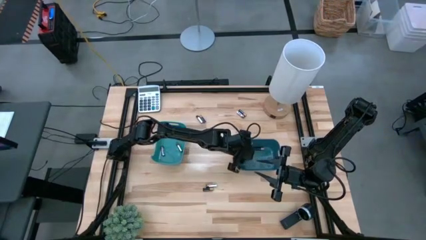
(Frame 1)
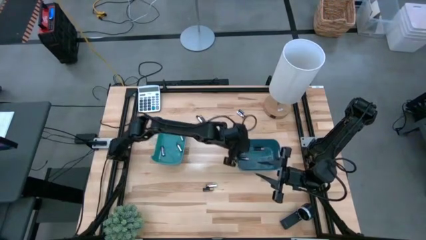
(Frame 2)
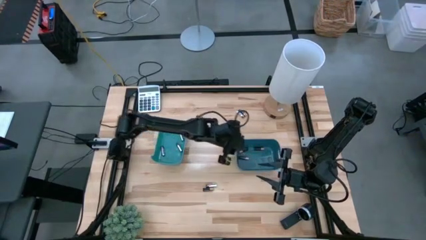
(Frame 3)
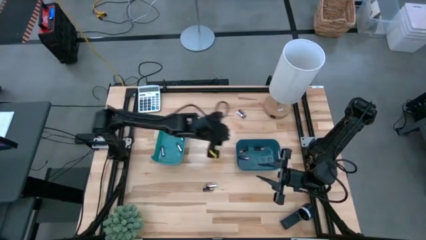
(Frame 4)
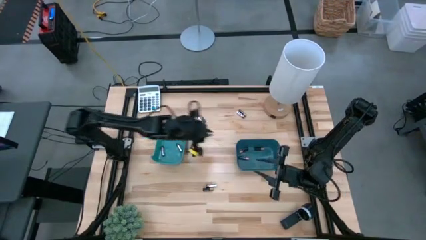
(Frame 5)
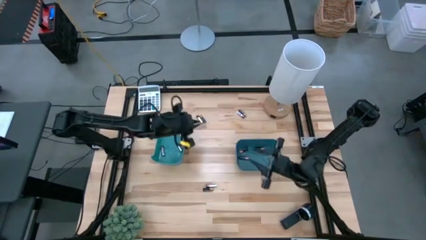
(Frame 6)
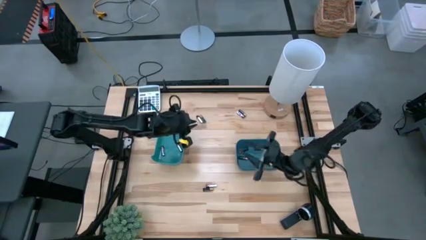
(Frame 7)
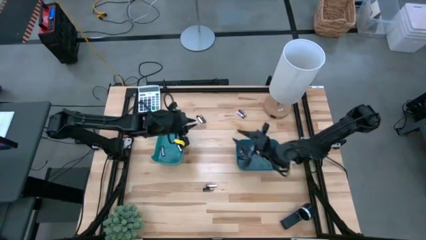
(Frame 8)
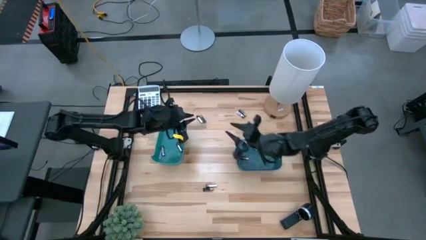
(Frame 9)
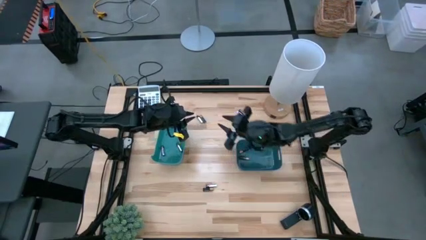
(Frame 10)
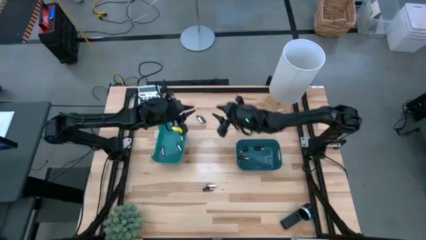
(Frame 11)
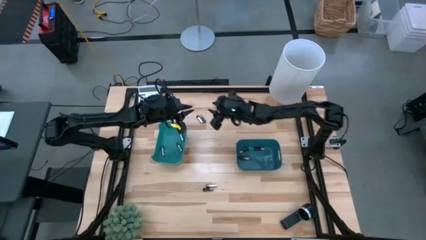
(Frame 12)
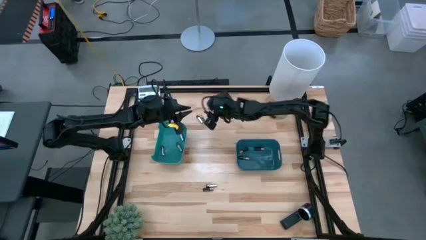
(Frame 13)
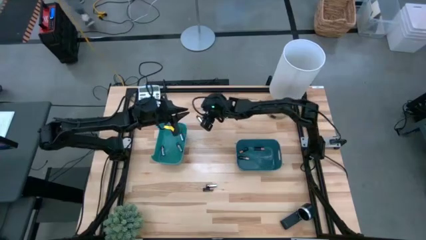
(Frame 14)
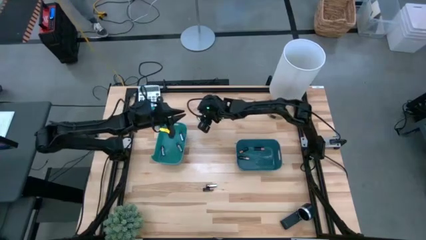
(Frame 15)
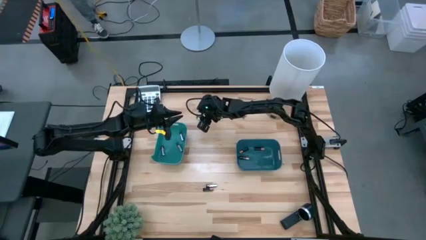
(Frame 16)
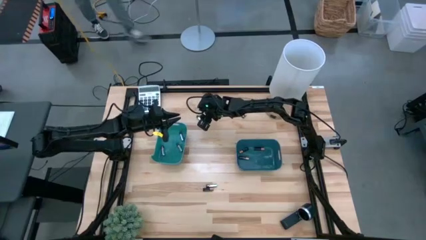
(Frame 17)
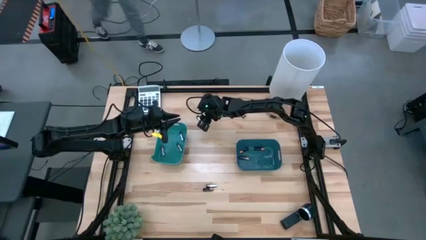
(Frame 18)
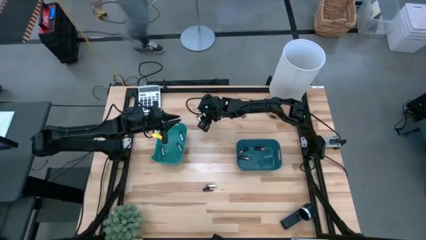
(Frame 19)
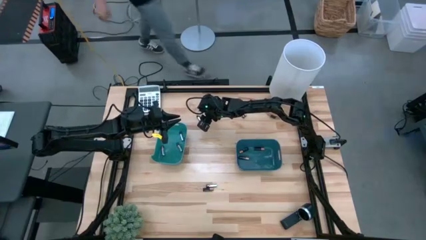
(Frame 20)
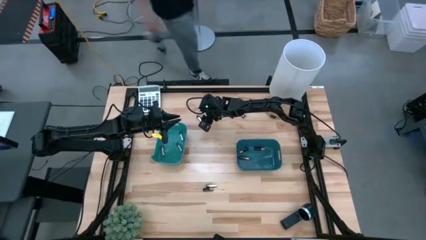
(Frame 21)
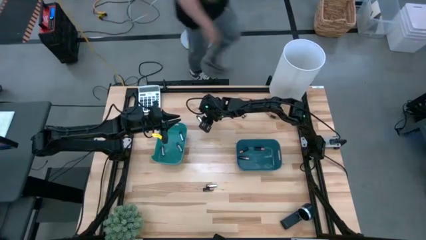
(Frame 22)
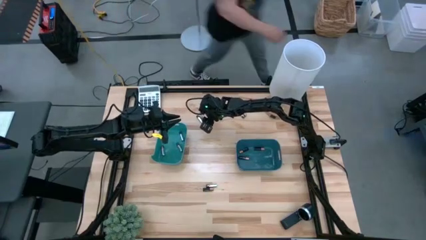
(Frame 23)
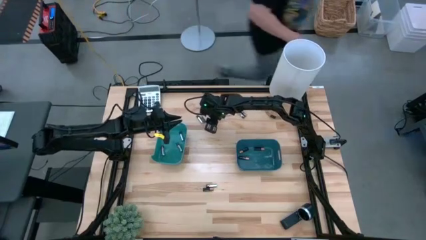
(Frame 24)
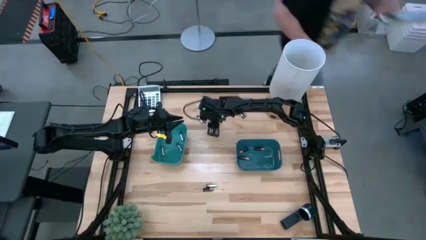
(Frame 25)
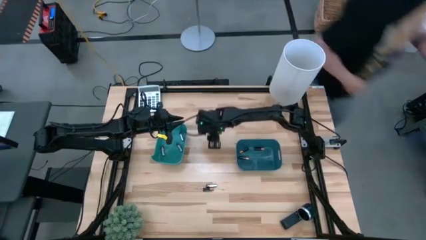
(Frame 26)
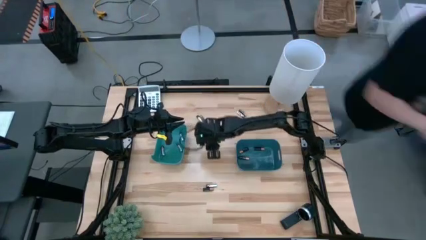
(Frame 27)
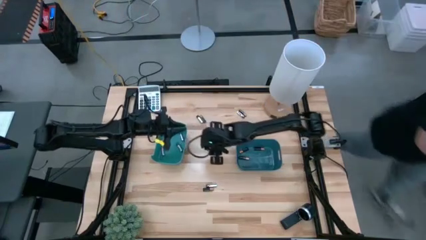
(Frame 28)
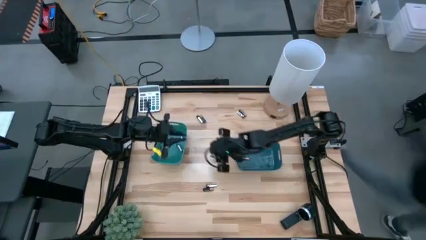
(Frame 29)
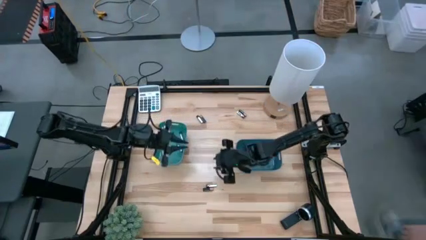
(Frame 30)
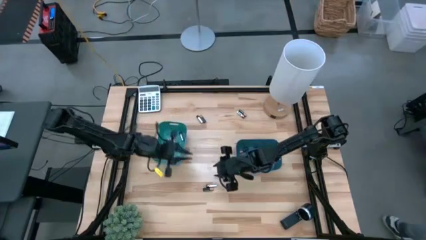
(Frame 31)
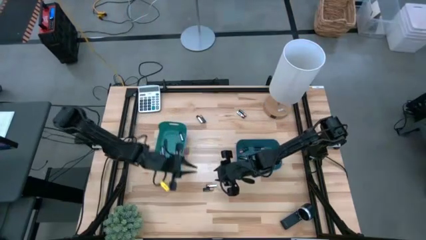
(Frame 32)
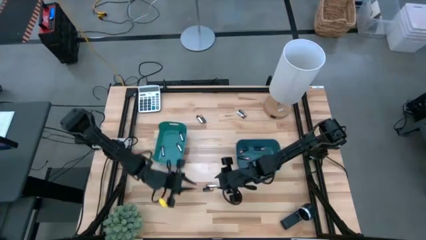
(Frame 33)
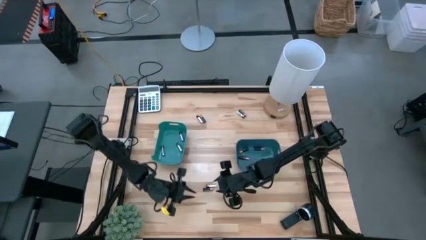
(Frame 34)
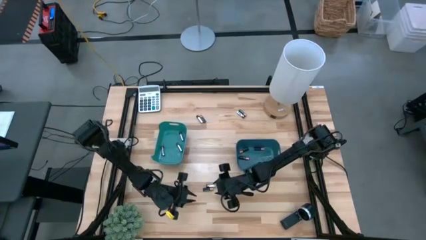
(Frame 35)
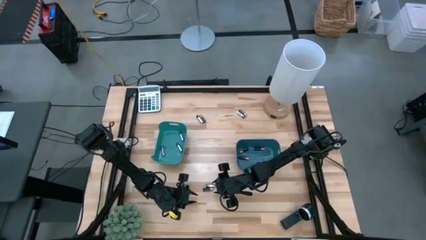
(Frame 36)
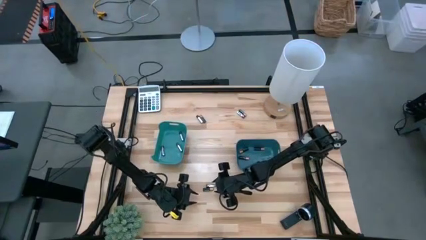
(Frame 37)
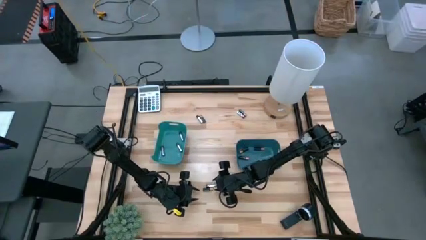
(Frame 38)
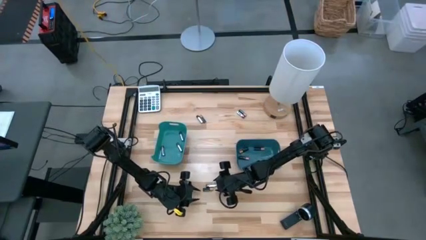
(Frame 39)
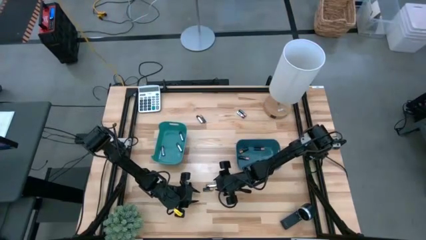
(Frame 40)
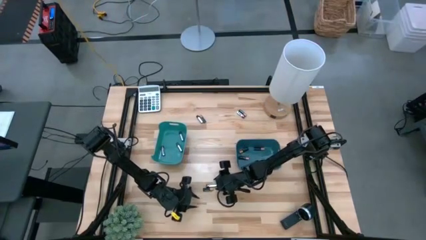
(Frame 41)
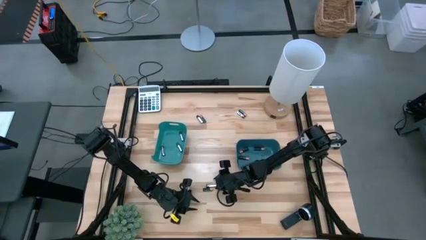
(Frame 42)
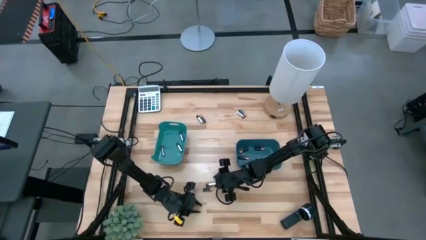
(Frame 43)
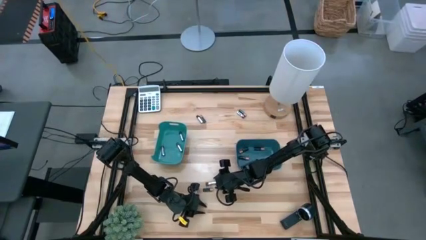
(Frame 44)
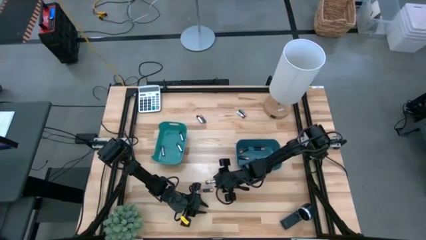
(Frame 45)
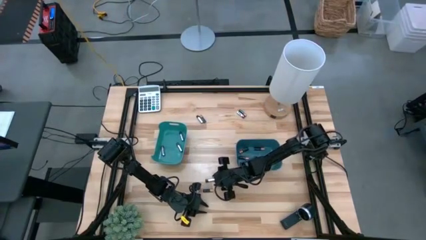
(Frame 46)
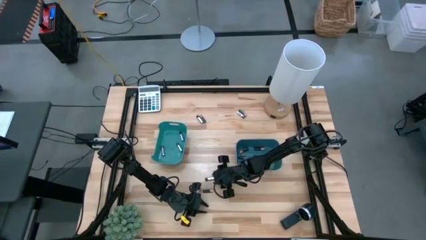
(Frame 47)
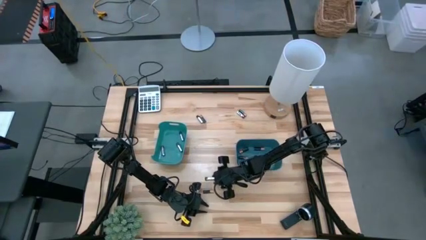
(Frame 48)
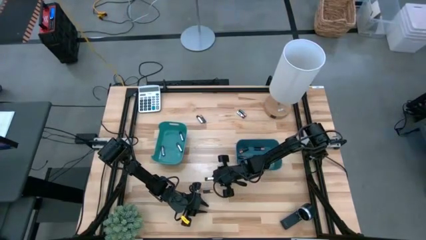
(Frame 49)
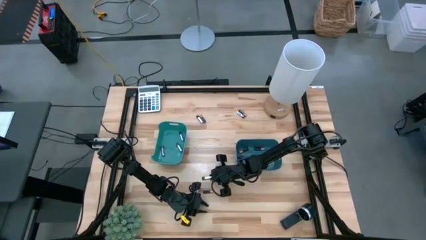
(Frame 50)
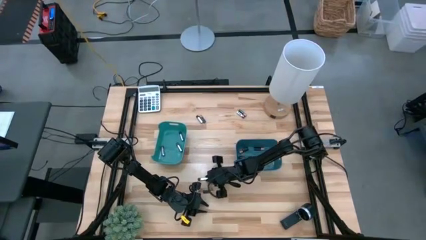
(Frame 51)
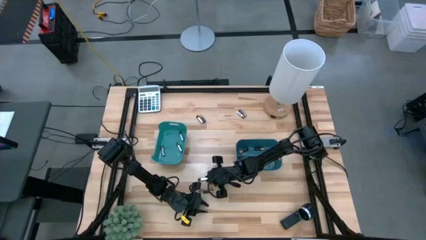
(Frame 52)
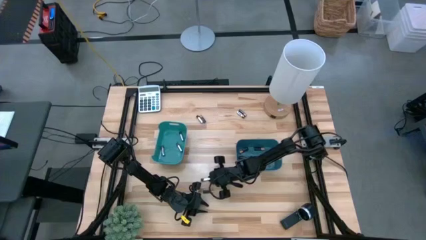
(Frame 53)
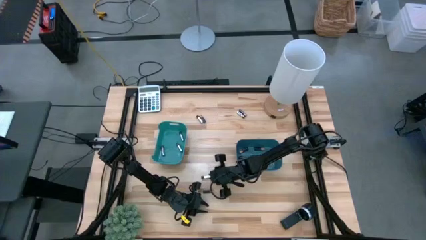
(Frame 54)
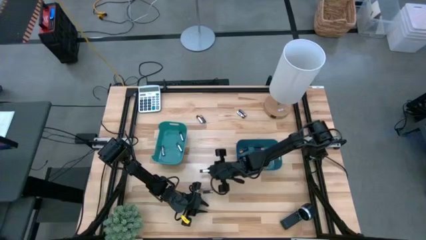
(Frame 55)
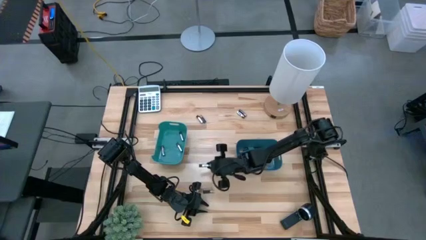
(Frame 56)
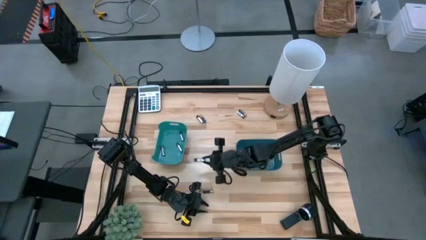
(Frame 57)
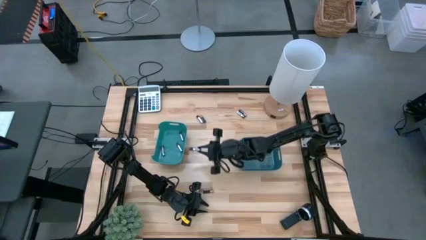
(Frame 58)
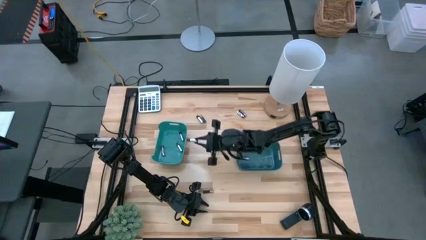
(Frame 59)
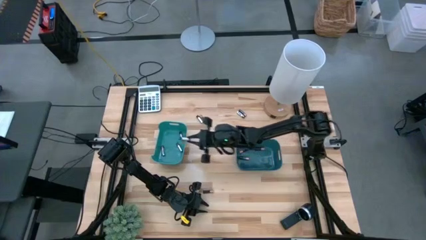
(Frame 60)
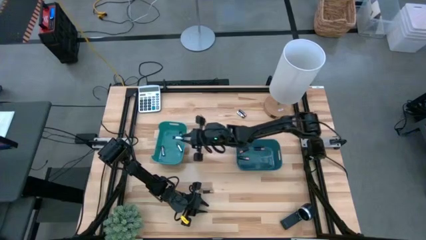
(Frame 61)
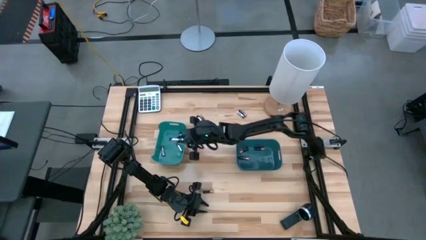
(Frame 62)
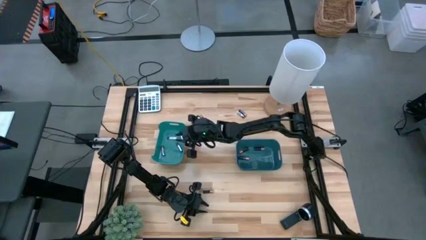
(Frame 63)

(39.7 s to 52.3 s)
Task: Sort batteries
Put the silver battery into the green bin

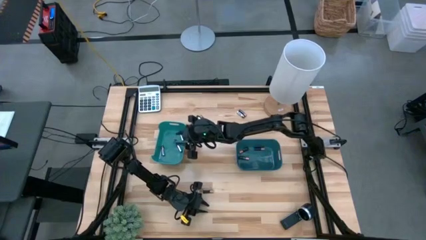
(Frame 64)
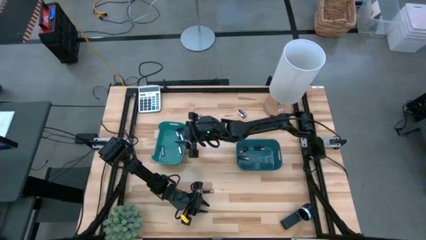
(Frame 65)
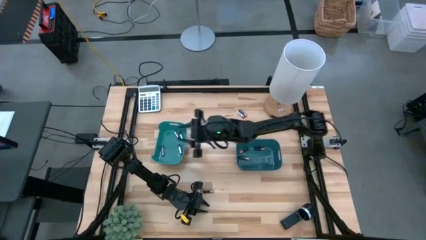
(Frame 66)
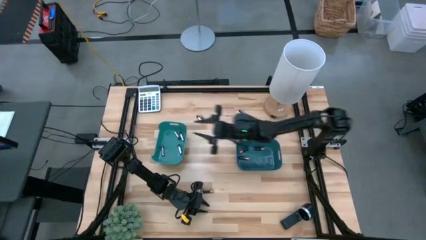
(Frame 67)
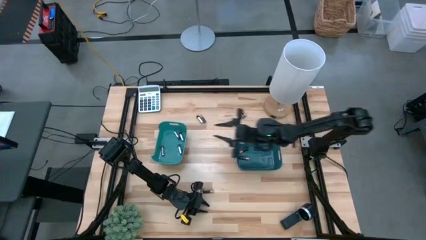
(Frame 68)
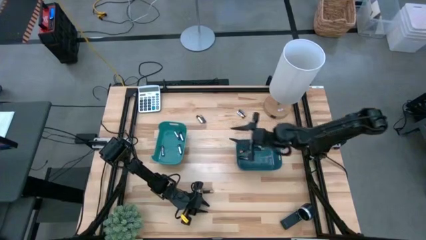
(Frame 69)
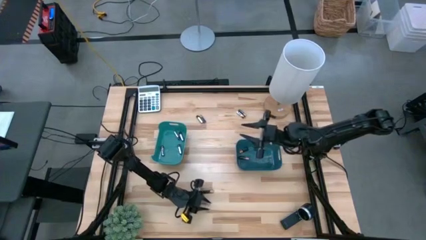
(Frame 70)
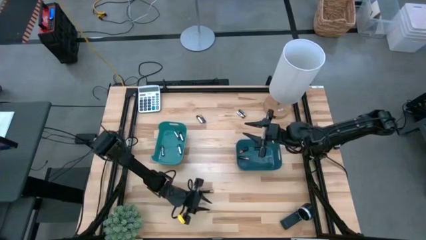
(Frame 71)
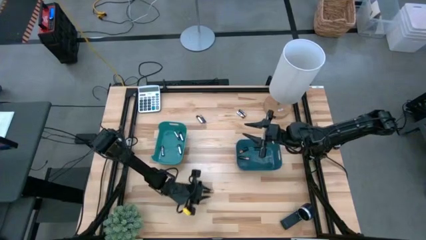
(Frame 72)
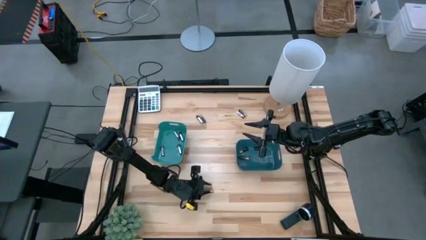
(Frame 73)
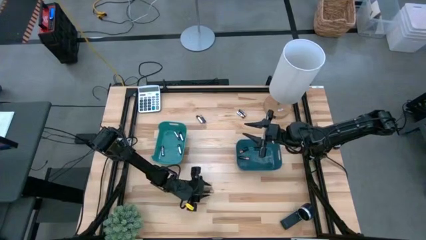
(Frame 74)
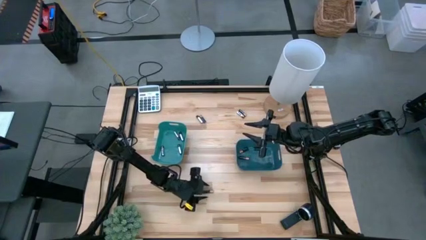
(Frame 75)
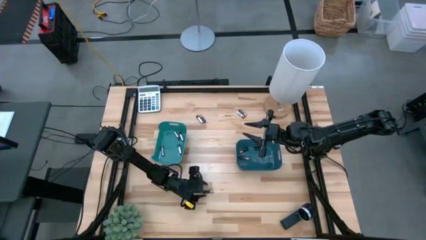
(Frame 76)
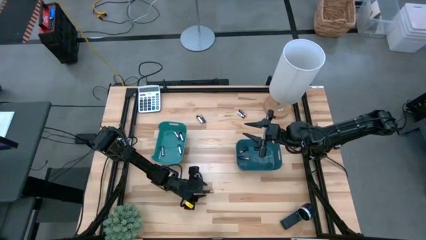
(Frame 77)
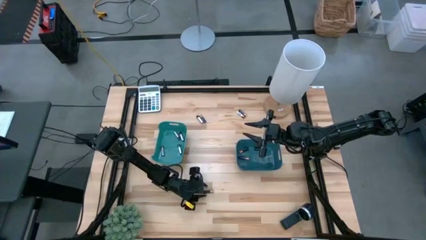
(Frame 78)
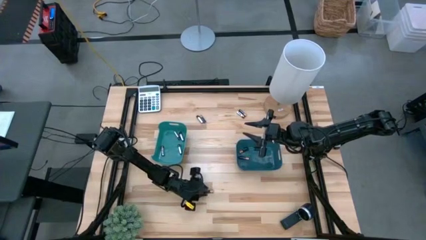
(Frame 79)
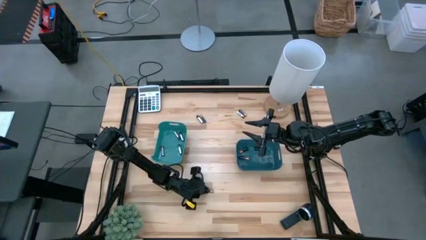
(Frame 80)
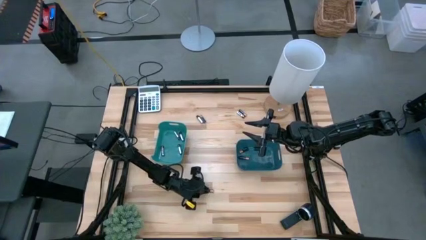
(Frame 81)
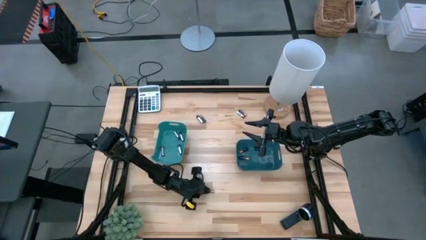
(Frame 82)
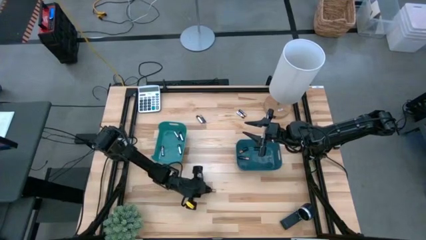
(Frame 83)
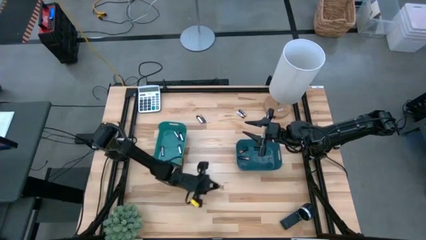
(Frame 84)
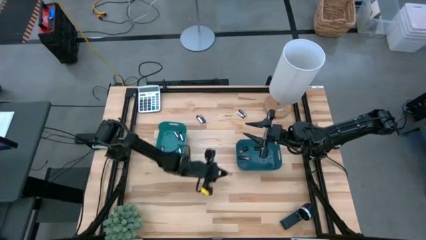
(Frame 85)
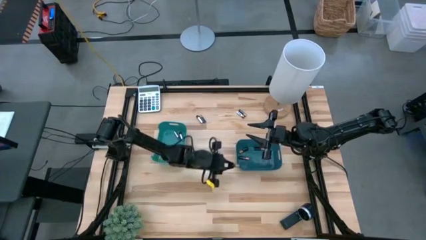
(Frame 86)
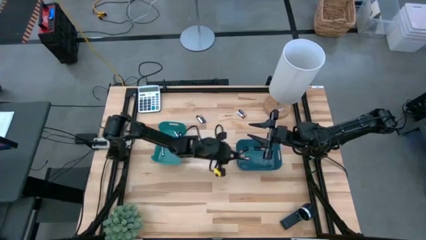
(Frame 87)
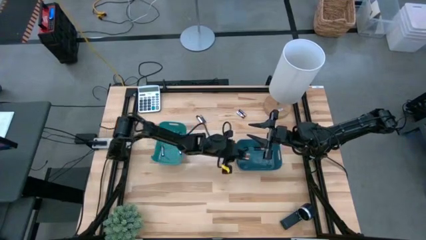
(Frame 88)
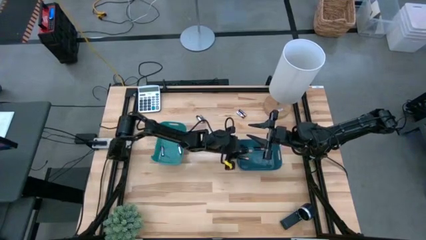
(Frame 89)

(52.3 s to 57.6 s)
Put the black battery into the dark blue bin
